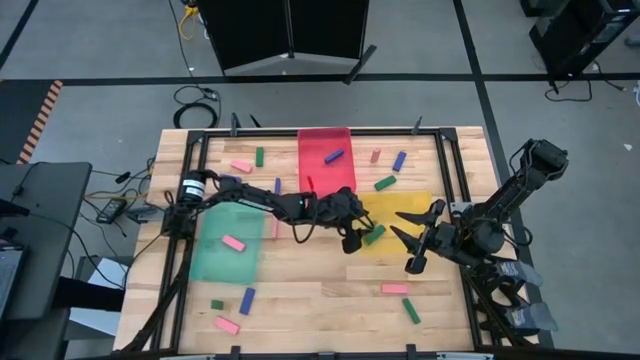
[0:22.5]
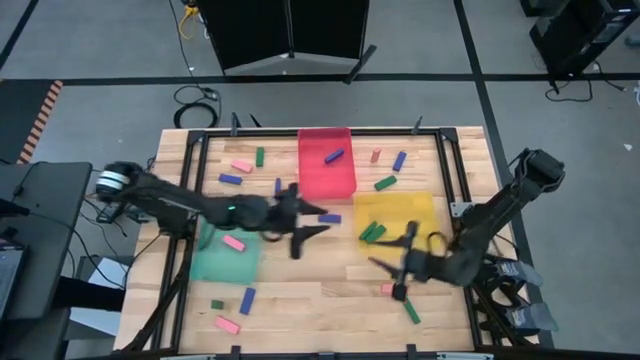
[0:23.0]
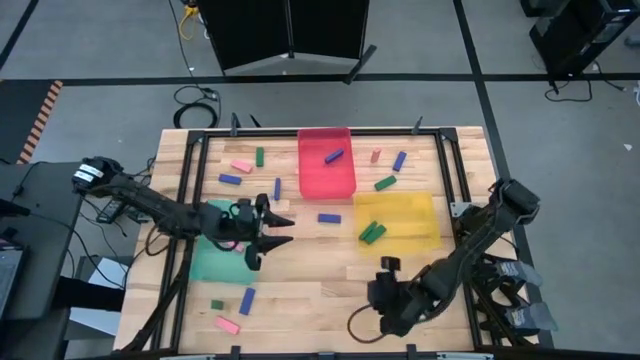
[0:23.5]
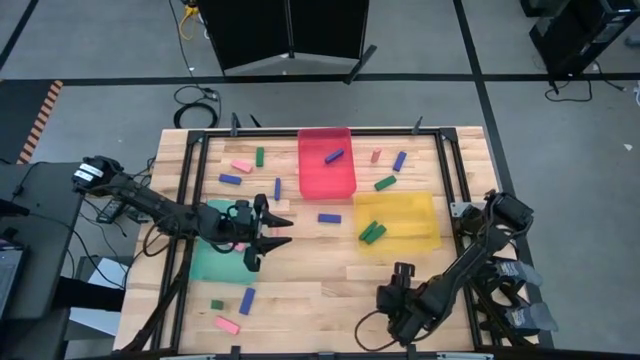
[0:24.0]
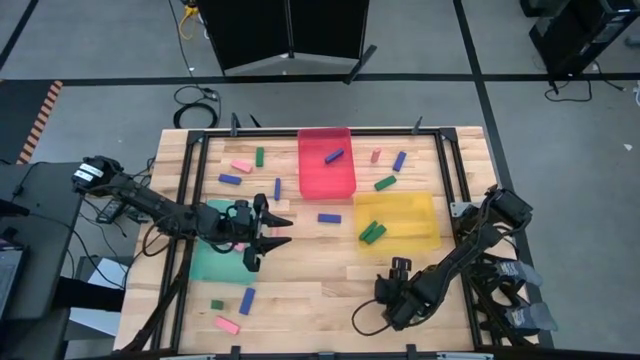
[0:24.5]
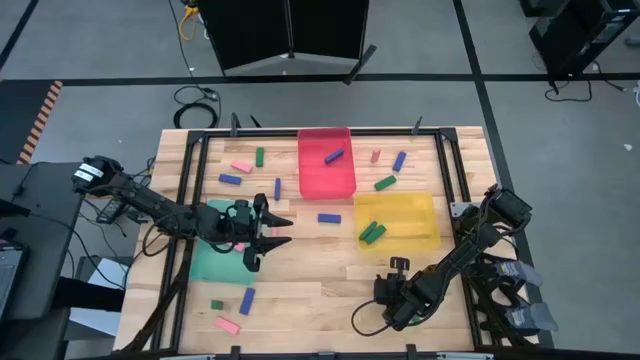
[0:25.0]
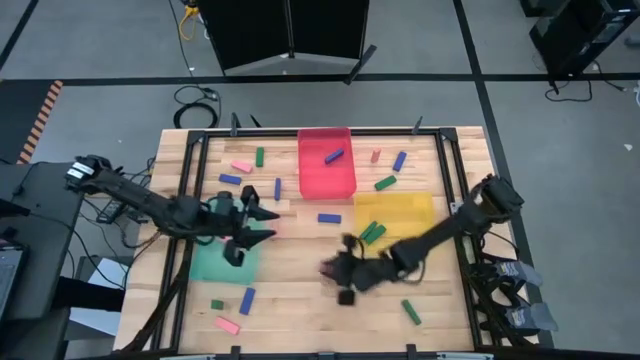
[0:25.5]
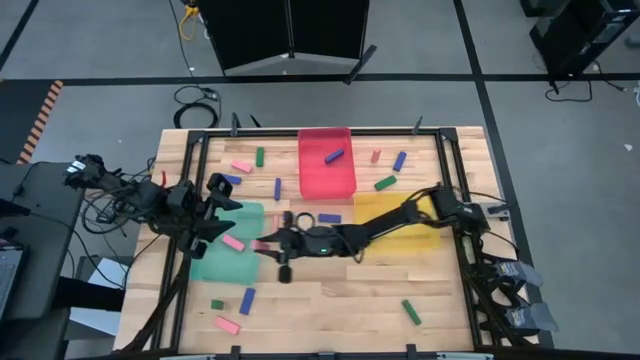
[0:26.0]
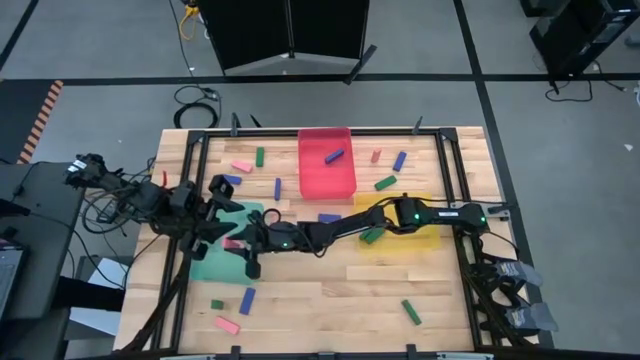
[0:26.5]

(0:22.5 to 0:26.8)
Task: Sort blocks
Put the pink block into the green bin

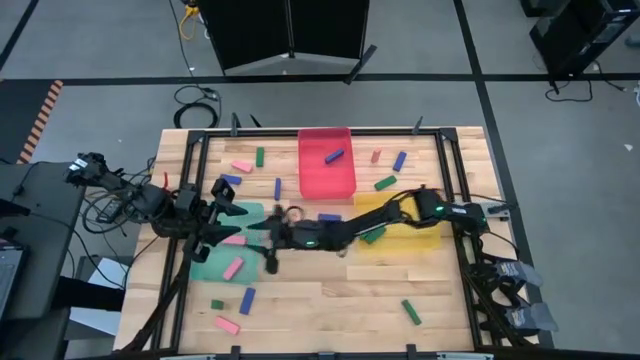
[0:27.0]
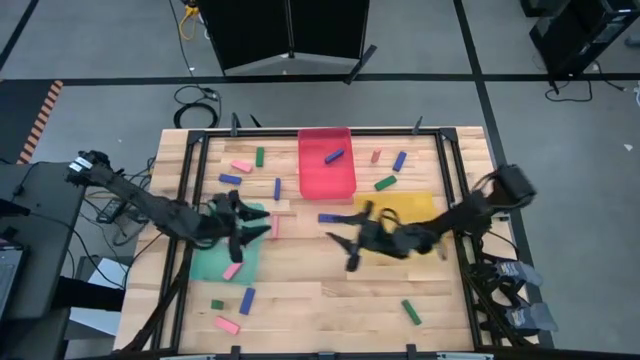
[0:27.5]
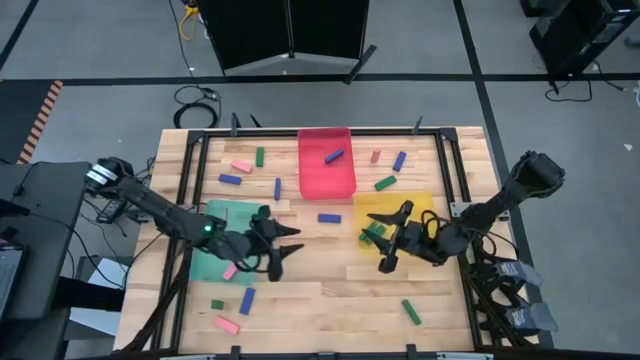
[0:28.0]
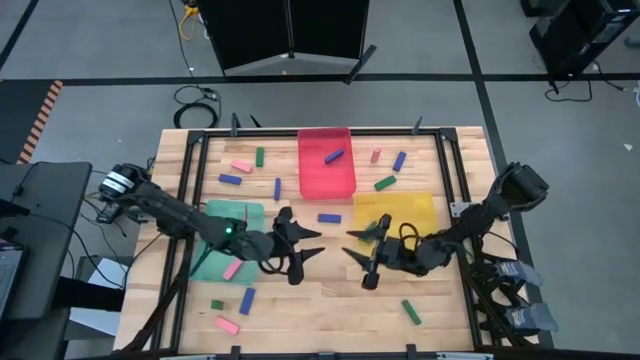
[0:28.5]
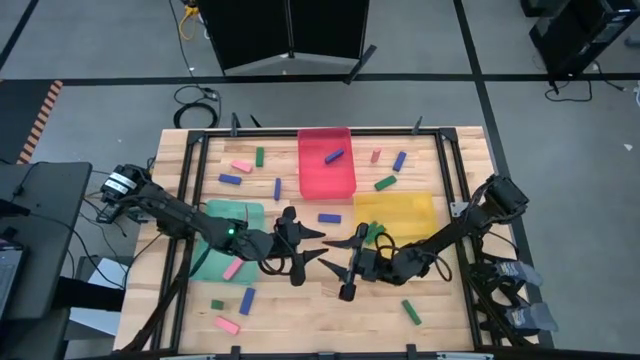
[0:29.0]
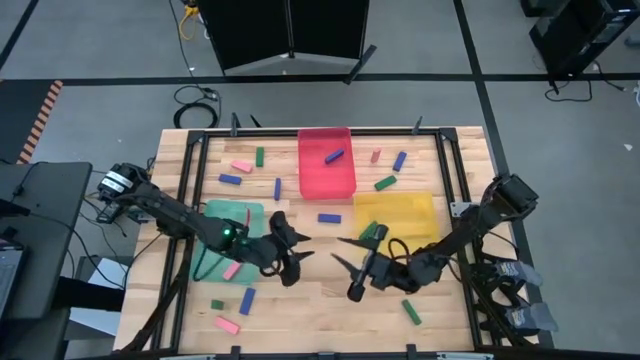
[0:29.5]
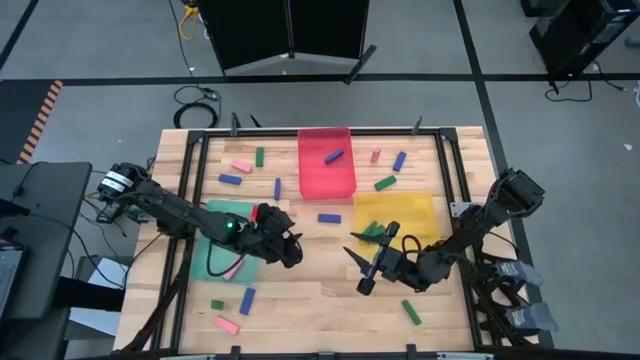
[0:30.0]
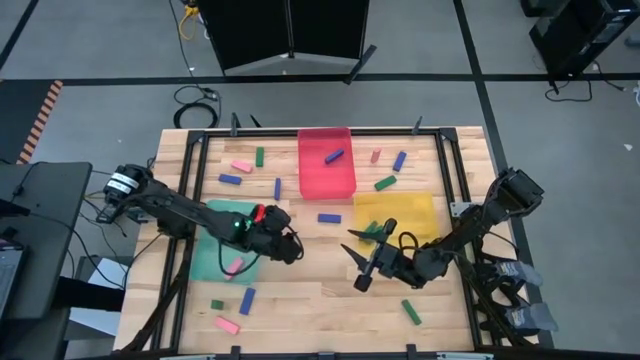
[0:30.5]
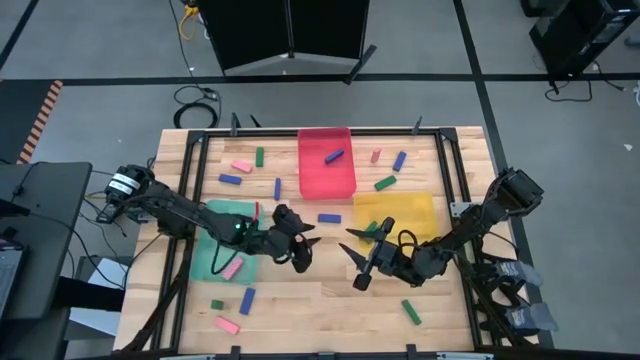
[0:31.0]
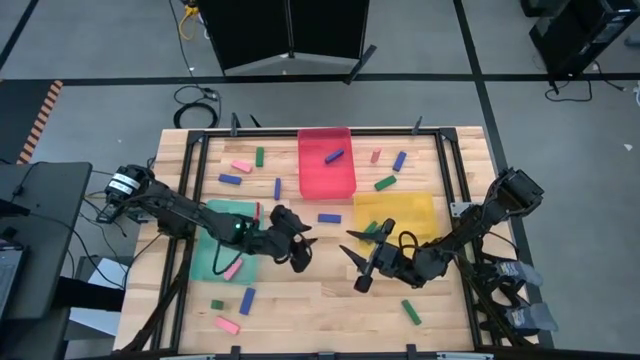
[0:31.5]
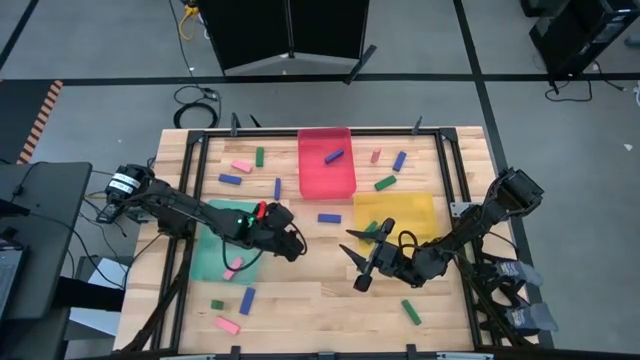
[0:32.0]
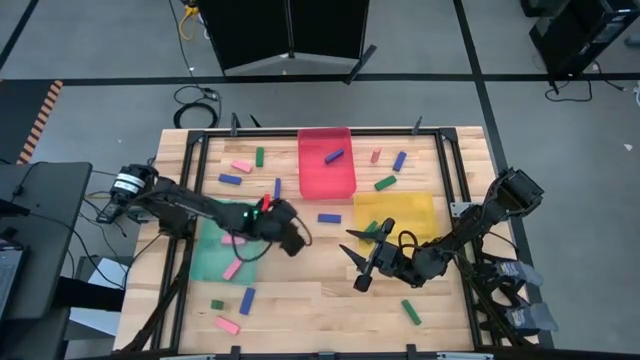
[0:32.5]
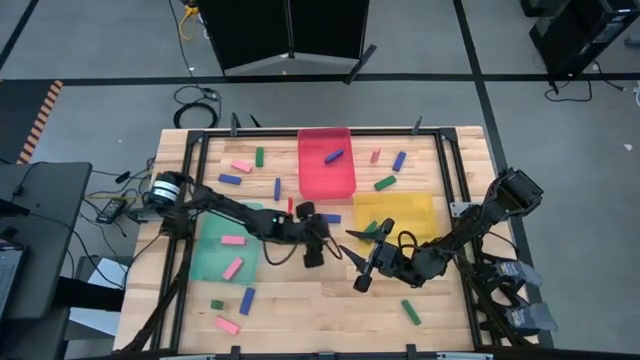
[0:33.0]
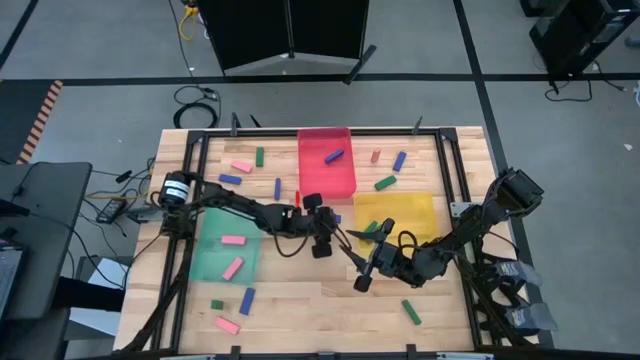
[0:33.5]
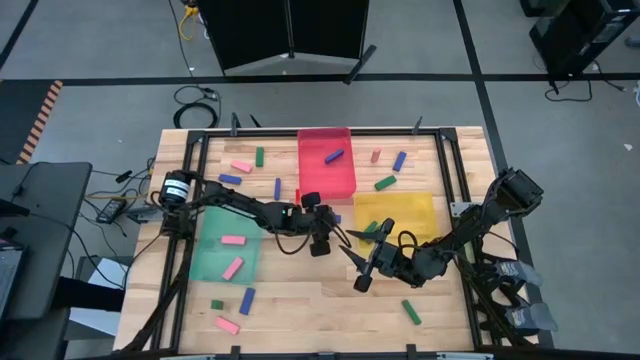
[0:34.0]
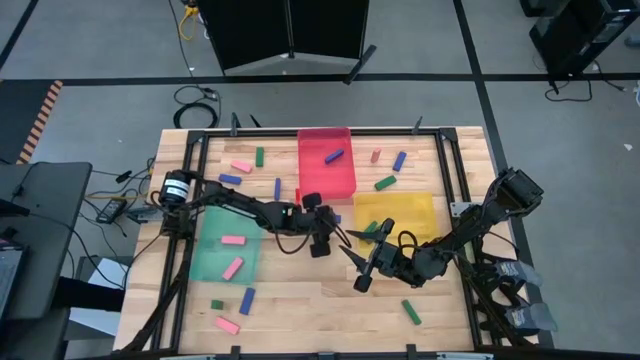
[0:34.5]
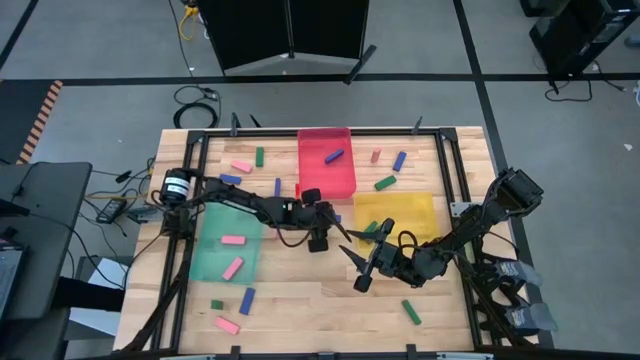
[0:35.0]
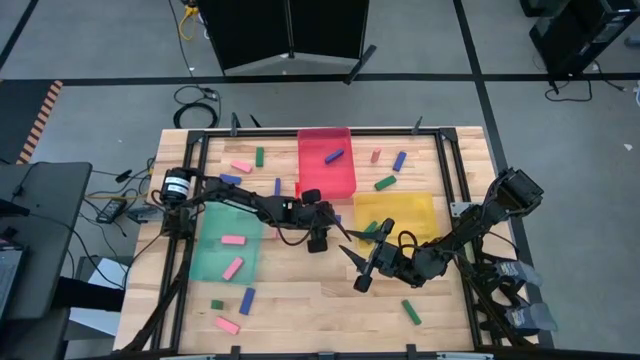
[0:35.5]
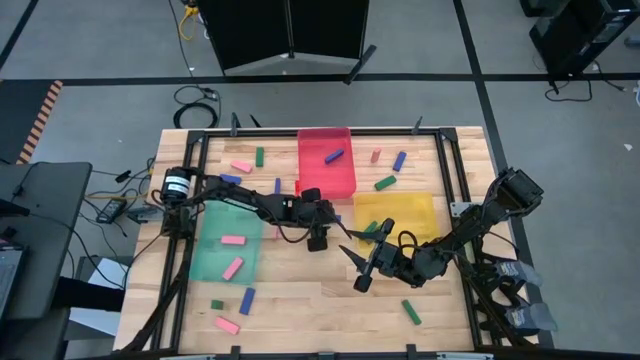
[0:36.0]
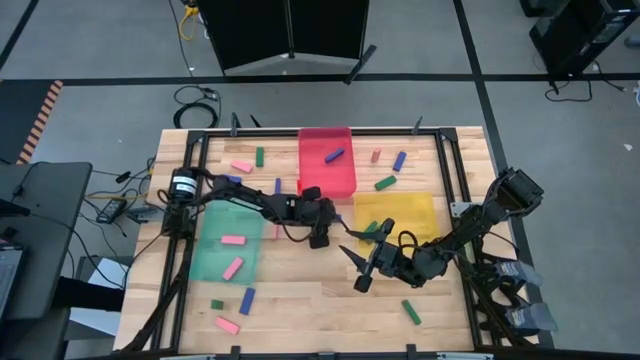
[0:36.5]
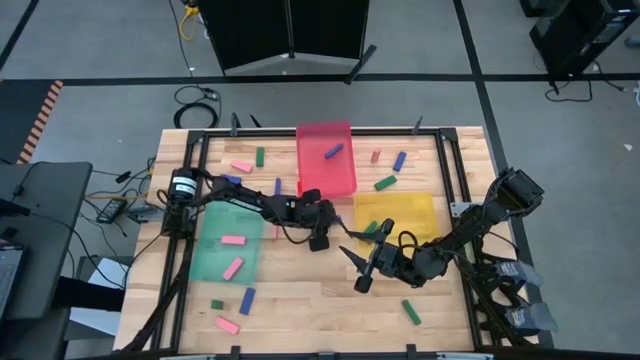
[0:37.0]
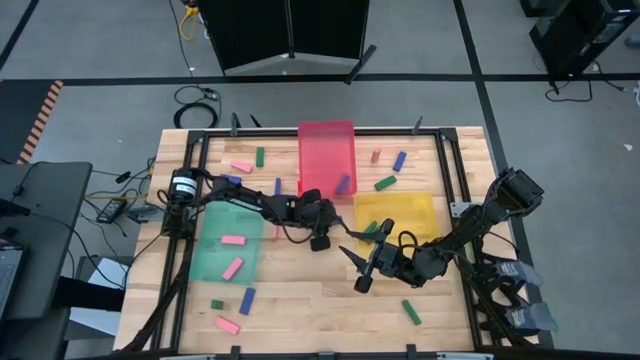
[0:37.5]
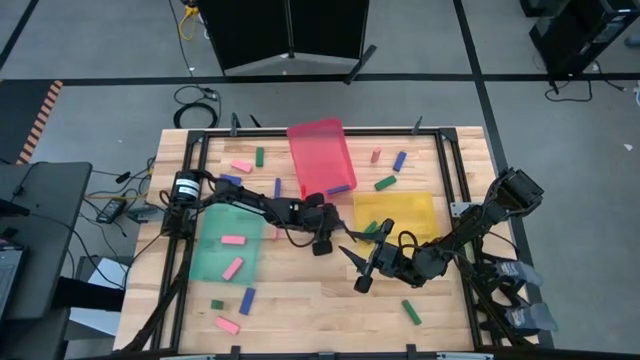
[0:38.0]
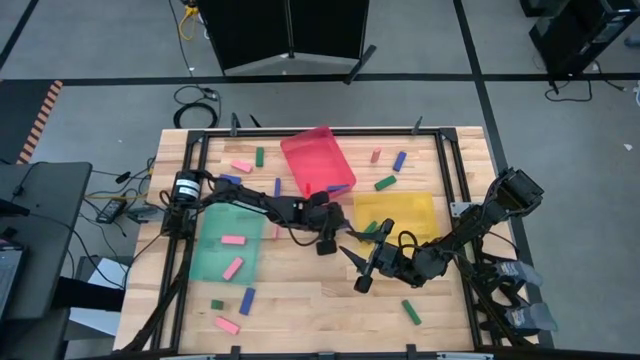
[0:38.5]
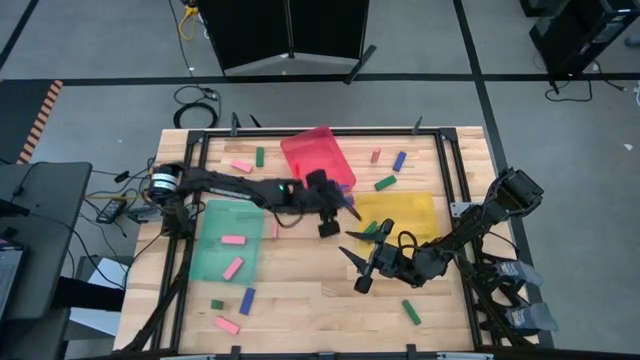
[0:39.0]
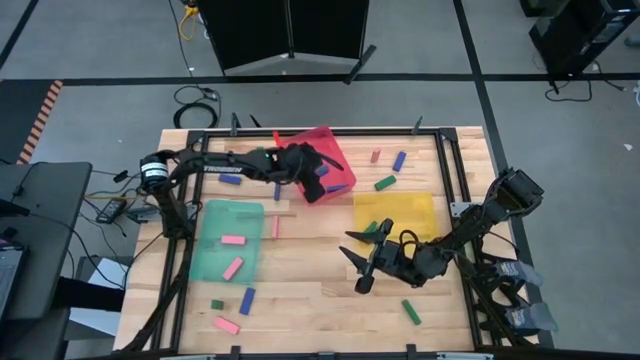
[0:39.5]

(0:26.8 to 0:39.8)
Put the blue block into the red bin

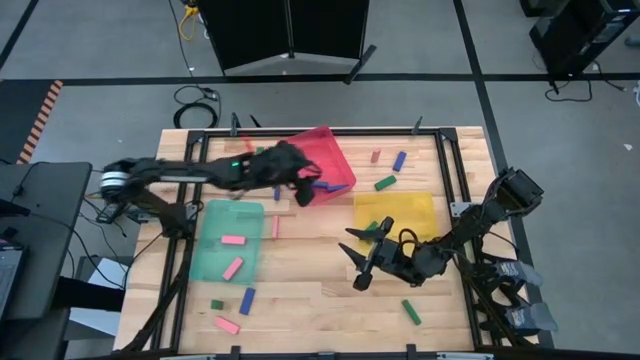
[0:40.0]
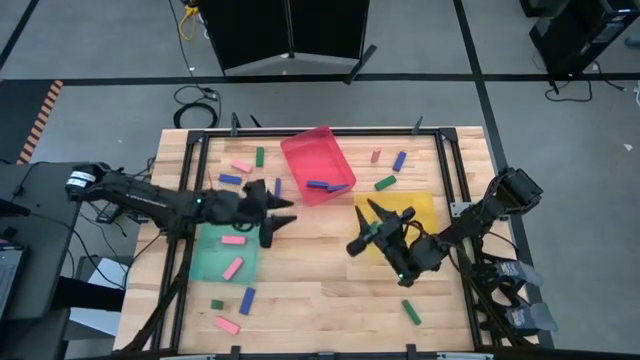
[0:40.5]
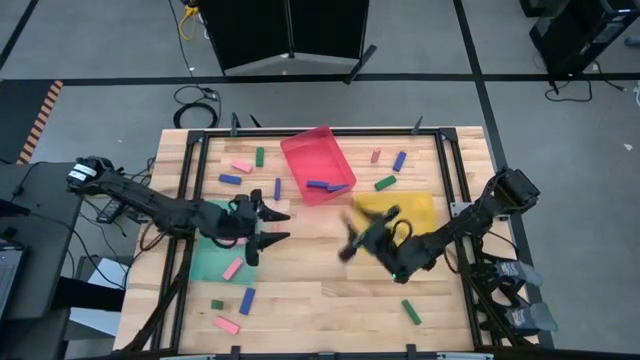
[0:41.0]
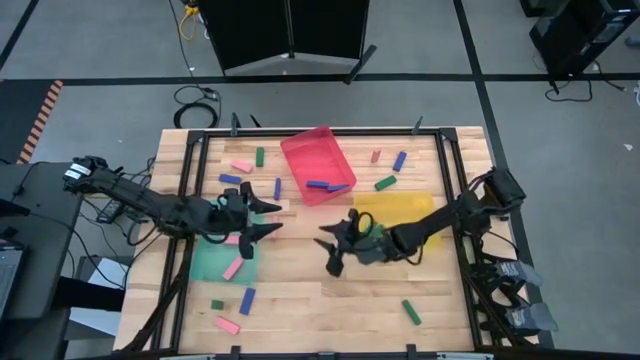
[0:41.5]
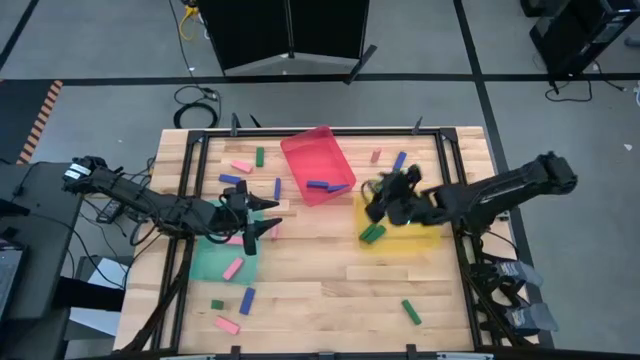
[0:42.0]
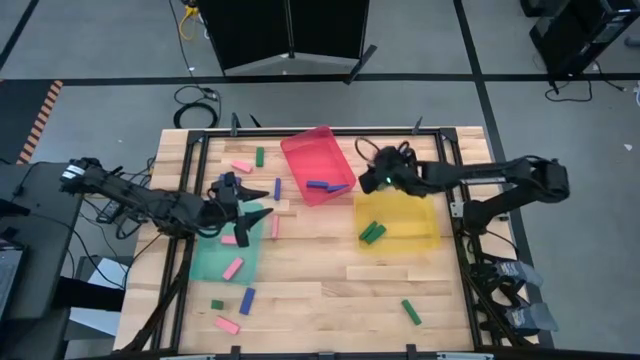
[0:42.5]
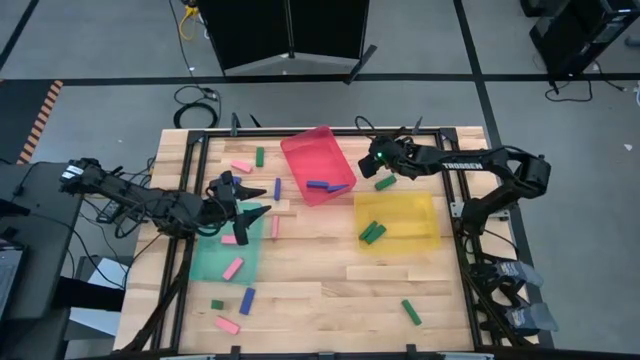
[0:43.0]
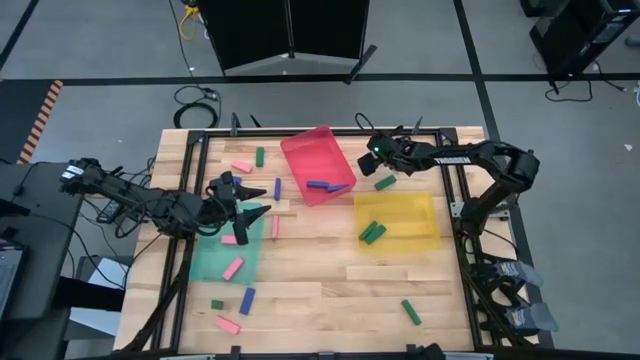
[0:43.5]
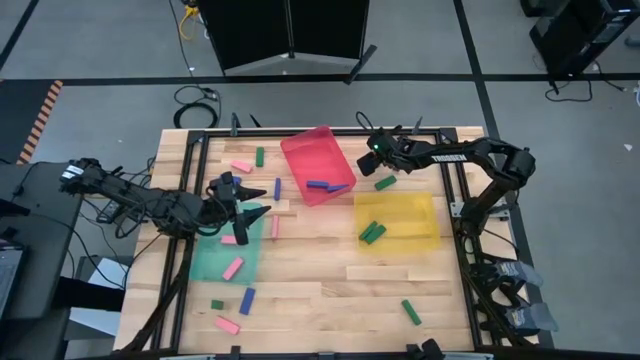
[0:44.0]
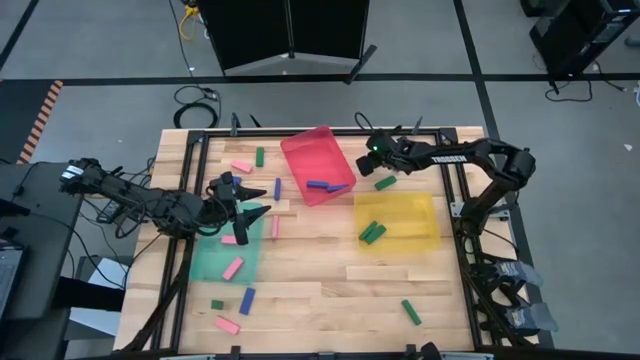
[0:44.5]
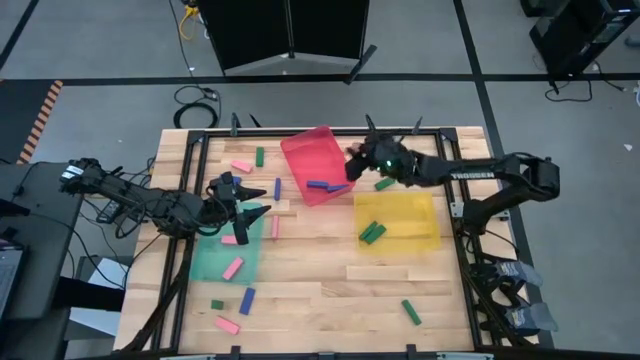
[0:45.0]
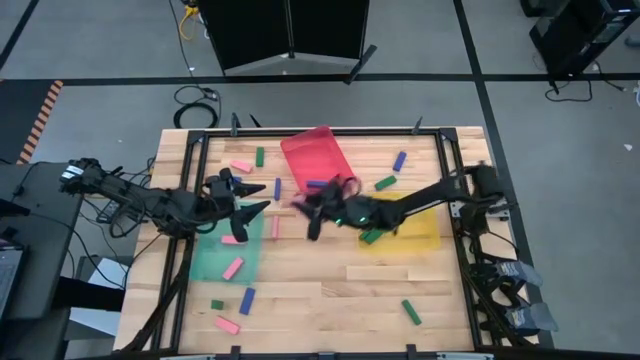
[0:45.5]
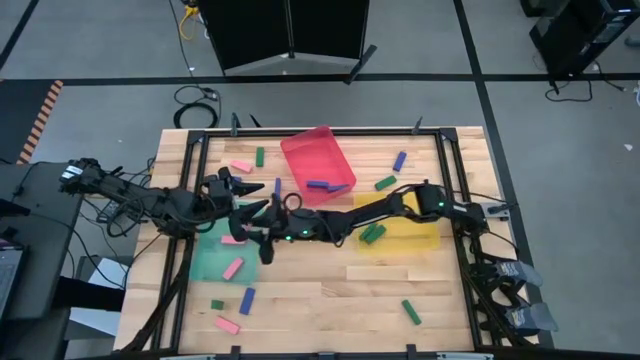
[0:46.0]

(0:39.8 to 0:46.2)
Put the pink block into the green bin
